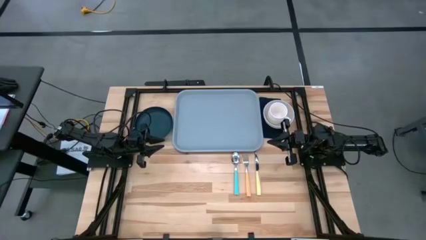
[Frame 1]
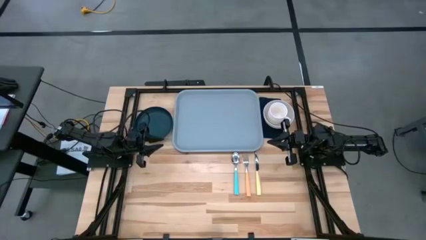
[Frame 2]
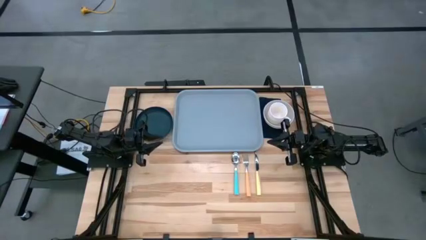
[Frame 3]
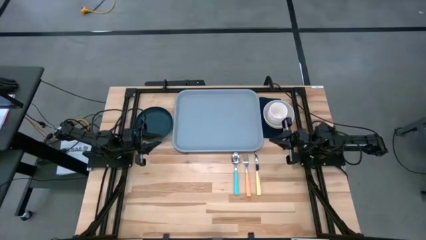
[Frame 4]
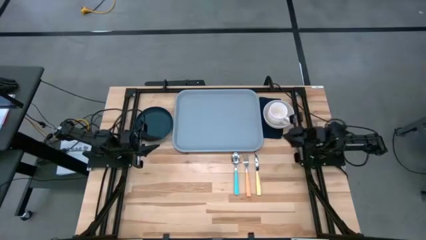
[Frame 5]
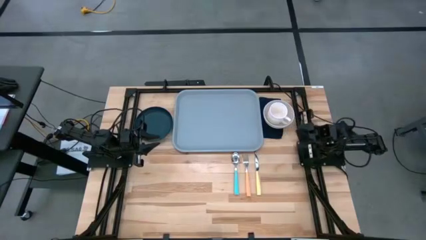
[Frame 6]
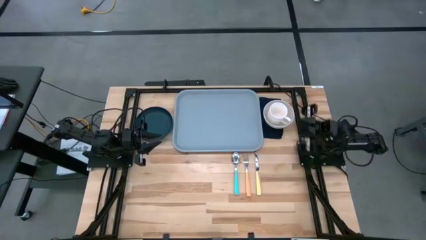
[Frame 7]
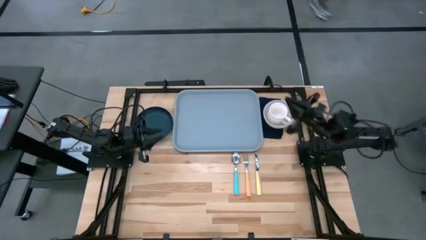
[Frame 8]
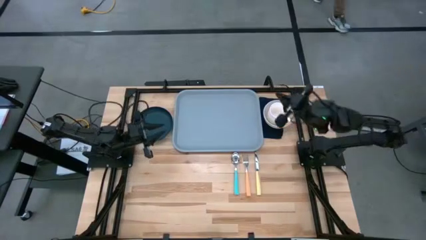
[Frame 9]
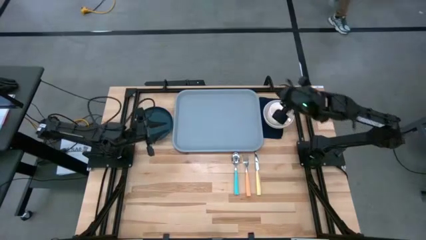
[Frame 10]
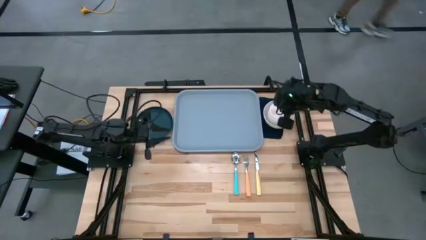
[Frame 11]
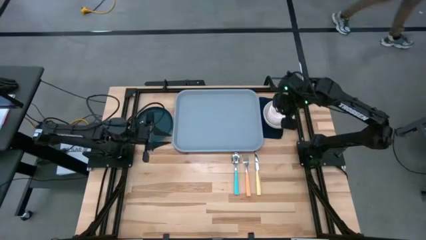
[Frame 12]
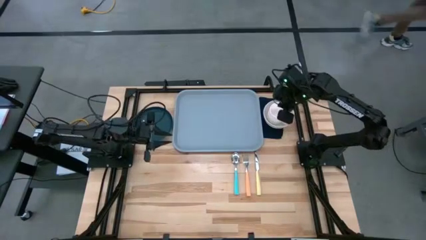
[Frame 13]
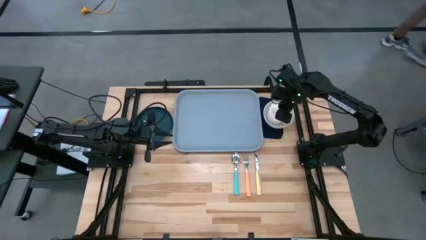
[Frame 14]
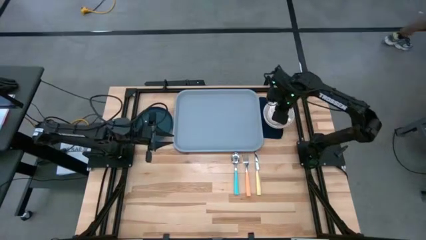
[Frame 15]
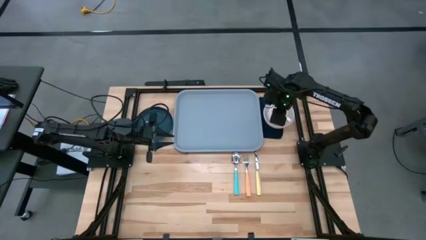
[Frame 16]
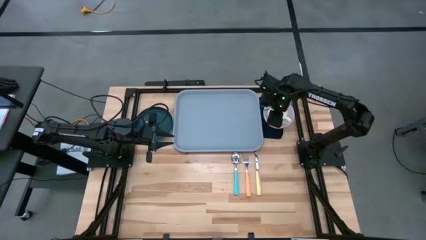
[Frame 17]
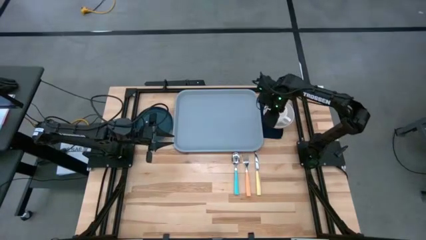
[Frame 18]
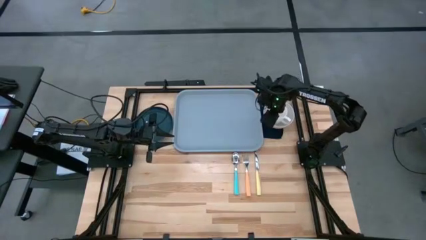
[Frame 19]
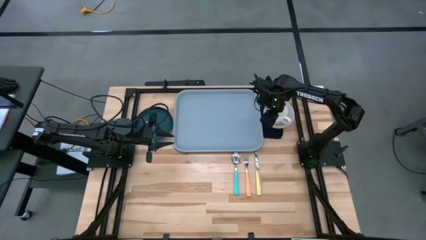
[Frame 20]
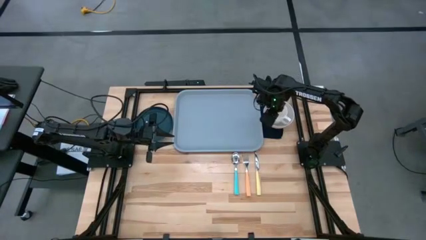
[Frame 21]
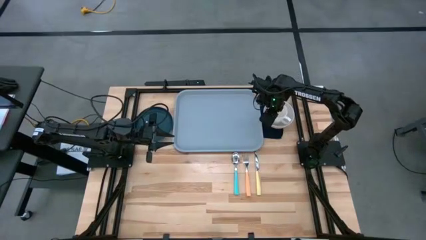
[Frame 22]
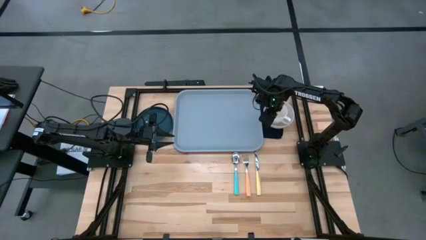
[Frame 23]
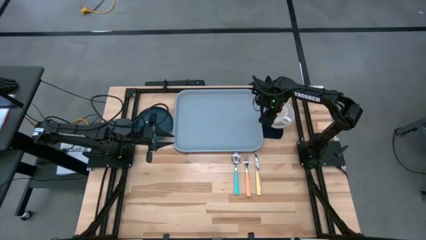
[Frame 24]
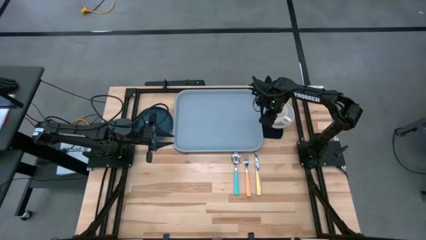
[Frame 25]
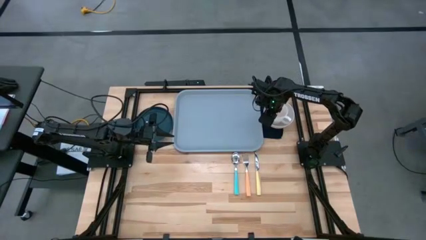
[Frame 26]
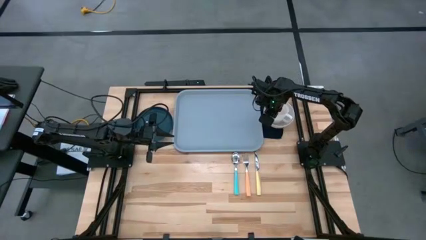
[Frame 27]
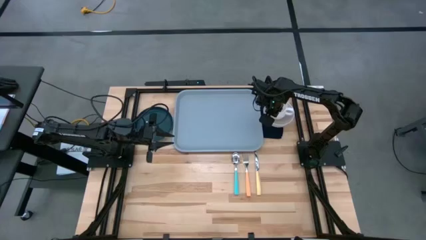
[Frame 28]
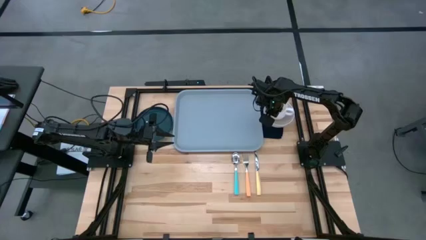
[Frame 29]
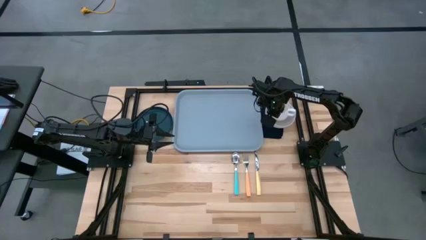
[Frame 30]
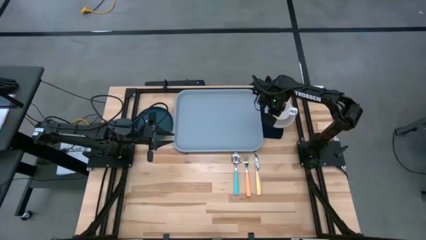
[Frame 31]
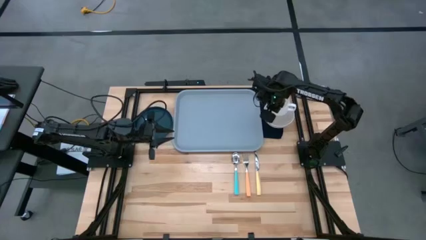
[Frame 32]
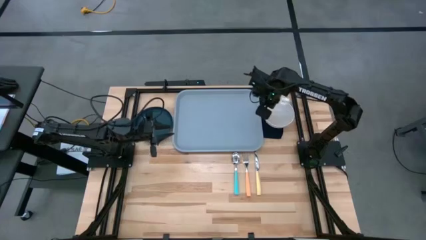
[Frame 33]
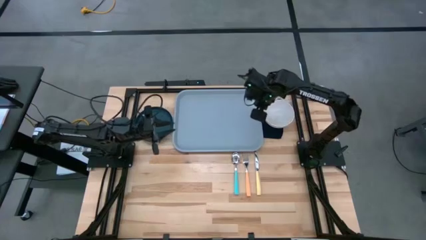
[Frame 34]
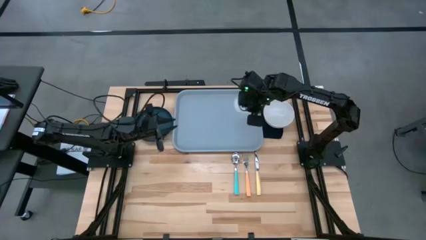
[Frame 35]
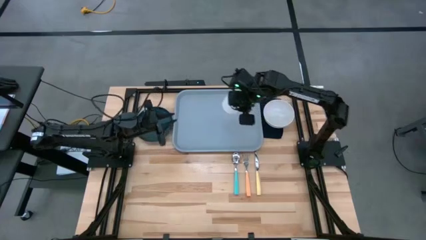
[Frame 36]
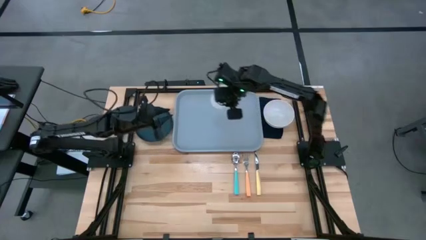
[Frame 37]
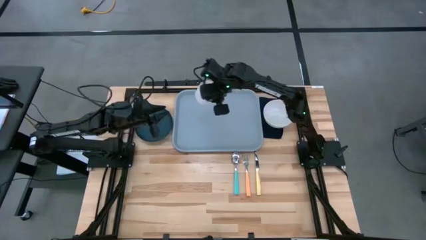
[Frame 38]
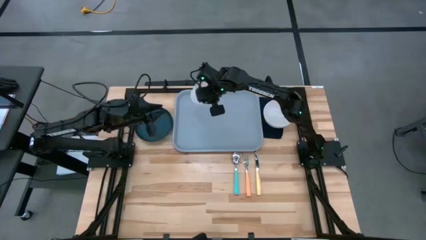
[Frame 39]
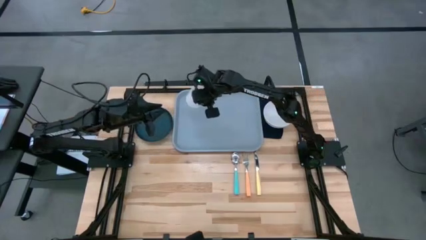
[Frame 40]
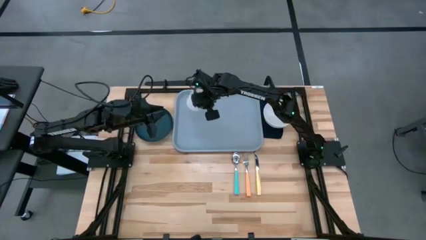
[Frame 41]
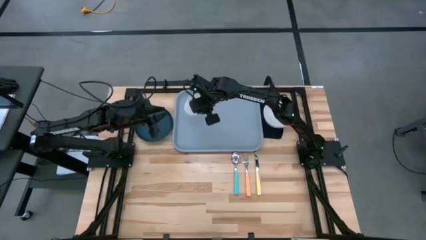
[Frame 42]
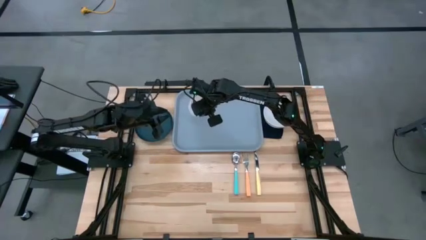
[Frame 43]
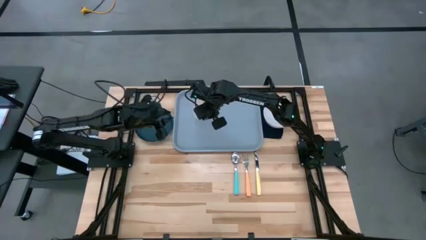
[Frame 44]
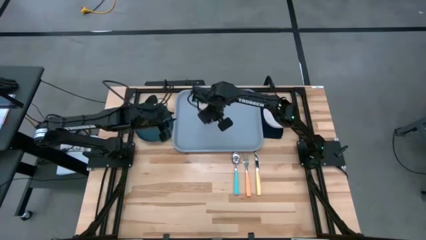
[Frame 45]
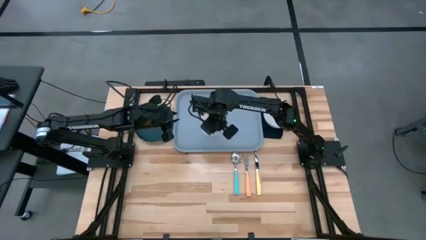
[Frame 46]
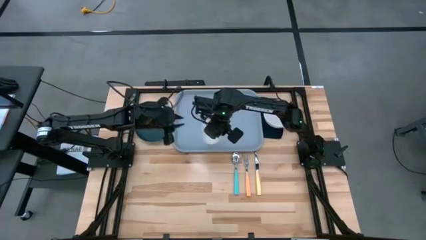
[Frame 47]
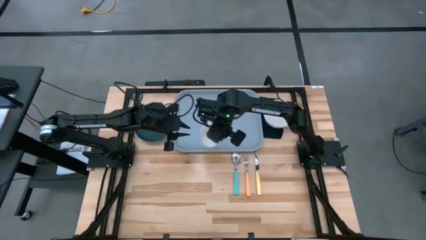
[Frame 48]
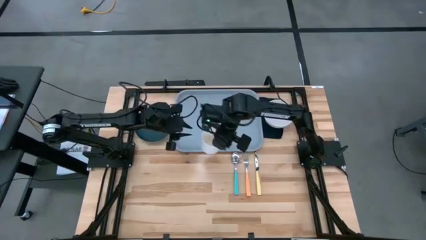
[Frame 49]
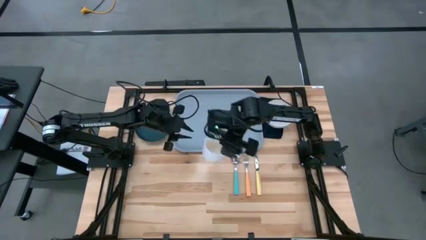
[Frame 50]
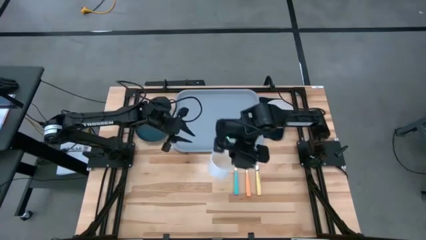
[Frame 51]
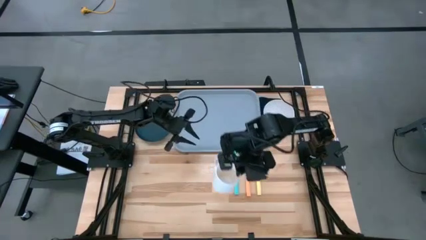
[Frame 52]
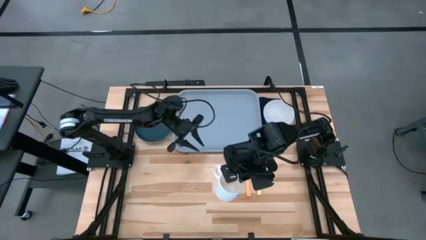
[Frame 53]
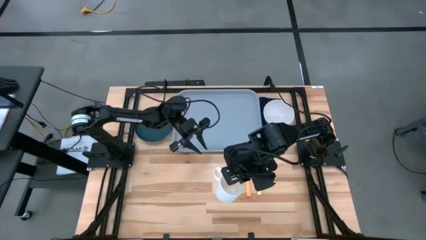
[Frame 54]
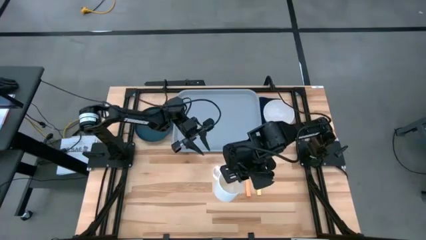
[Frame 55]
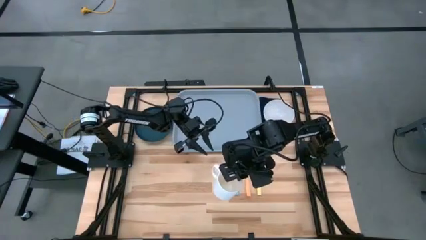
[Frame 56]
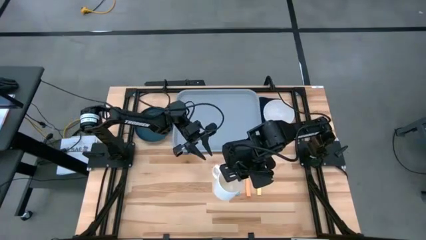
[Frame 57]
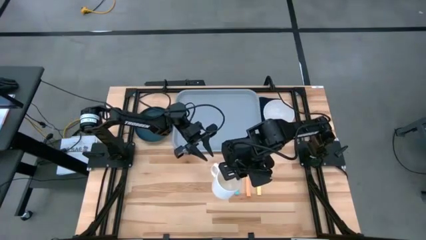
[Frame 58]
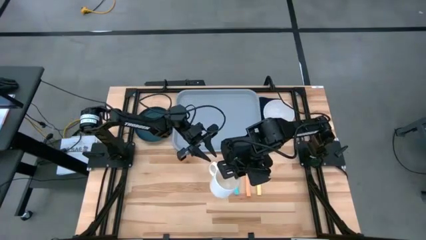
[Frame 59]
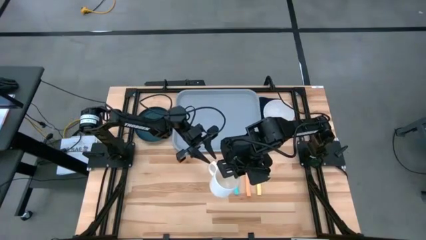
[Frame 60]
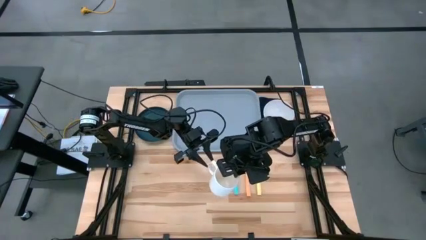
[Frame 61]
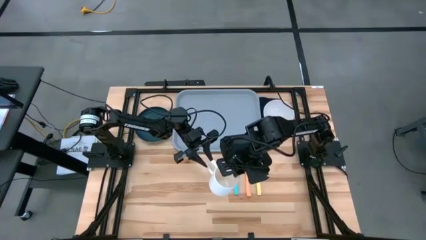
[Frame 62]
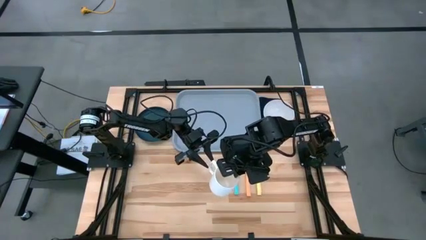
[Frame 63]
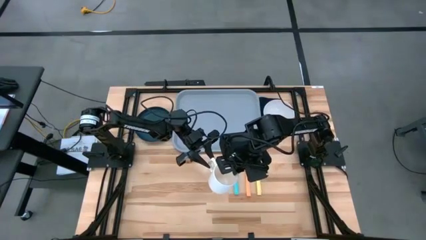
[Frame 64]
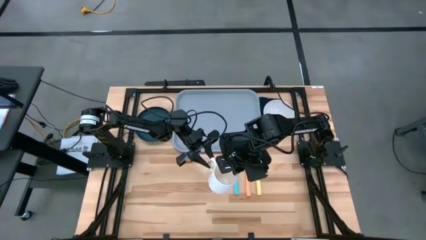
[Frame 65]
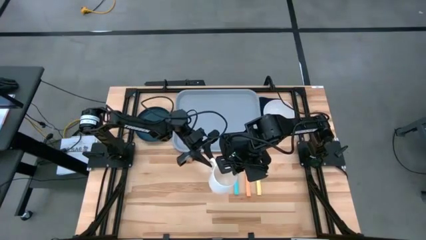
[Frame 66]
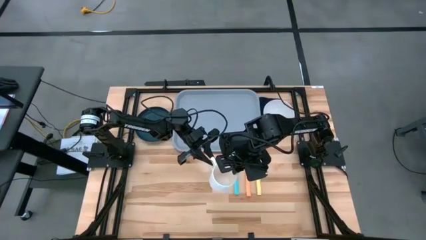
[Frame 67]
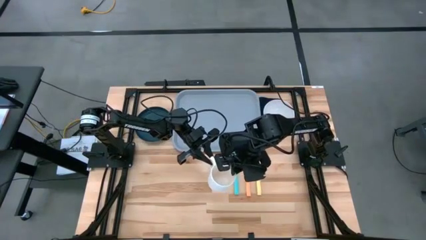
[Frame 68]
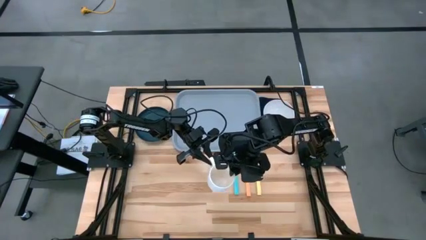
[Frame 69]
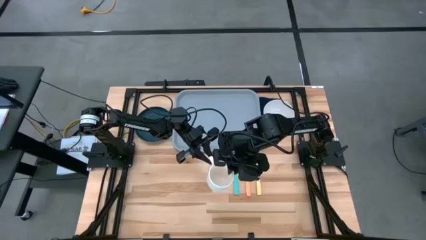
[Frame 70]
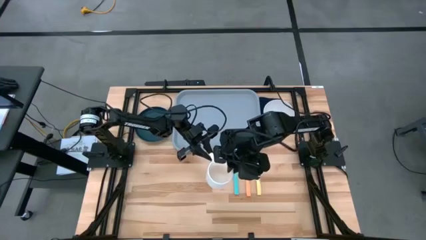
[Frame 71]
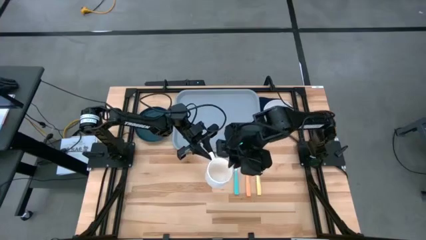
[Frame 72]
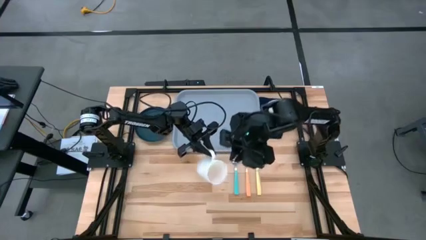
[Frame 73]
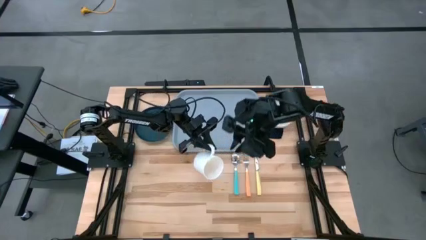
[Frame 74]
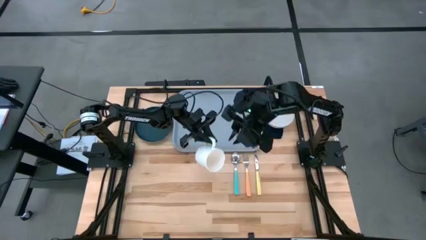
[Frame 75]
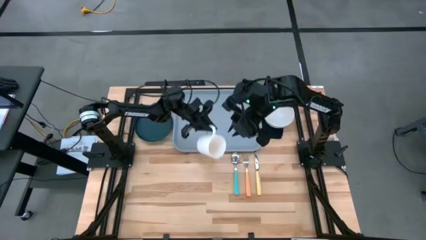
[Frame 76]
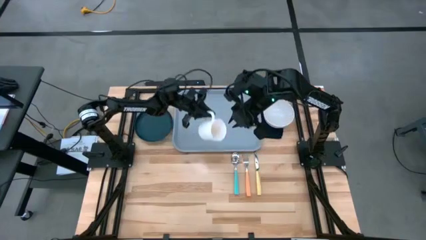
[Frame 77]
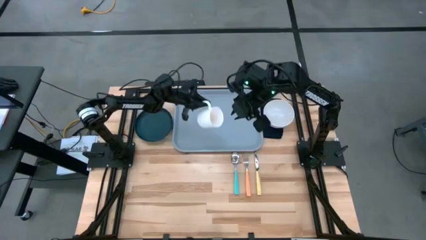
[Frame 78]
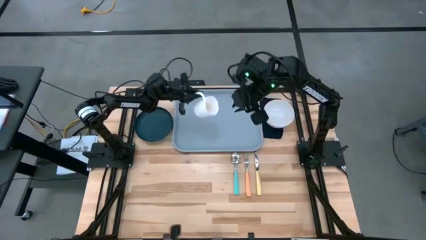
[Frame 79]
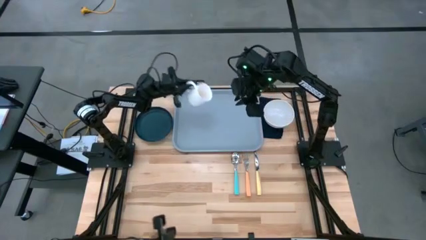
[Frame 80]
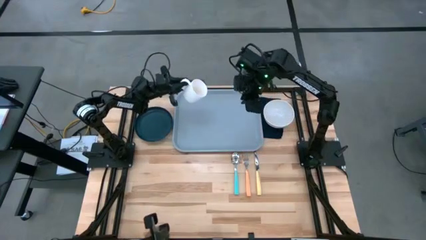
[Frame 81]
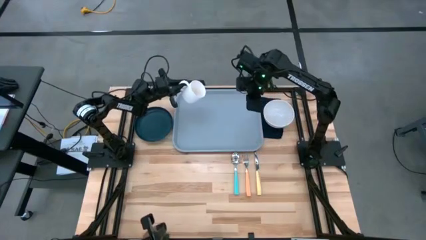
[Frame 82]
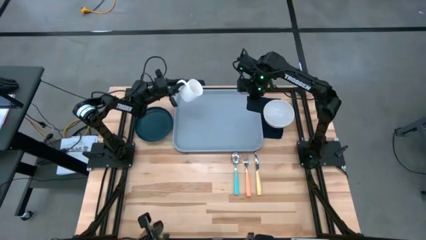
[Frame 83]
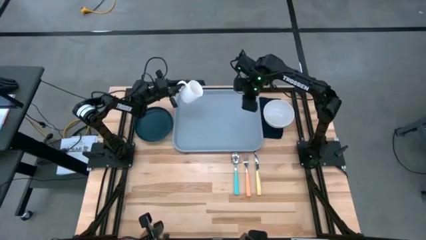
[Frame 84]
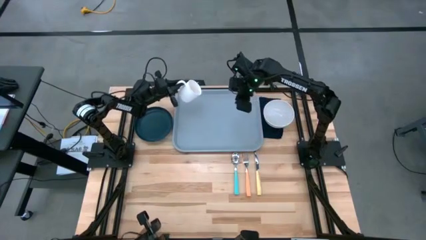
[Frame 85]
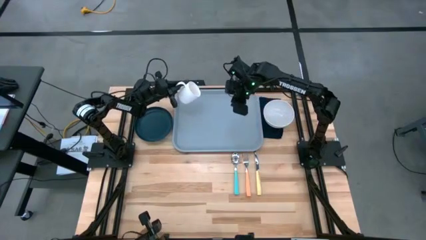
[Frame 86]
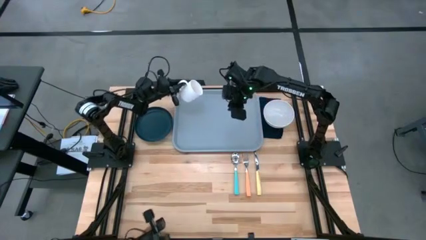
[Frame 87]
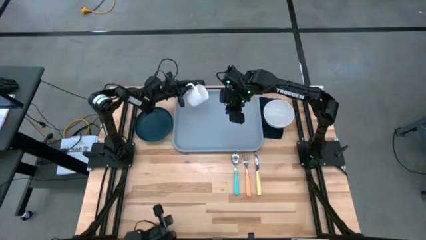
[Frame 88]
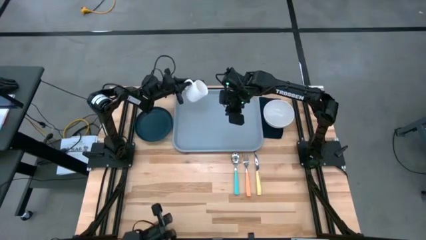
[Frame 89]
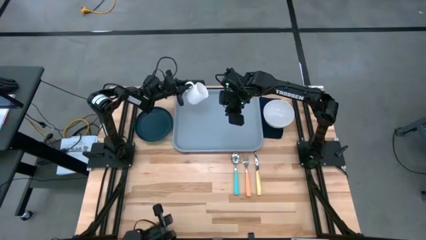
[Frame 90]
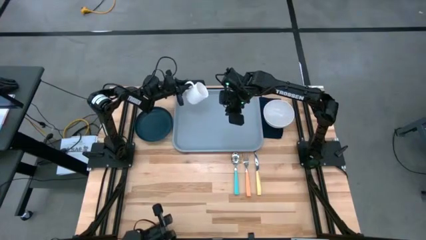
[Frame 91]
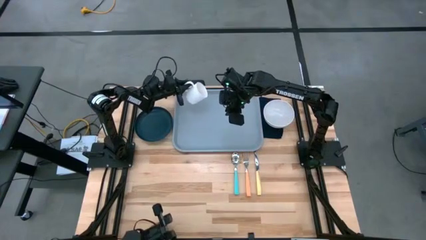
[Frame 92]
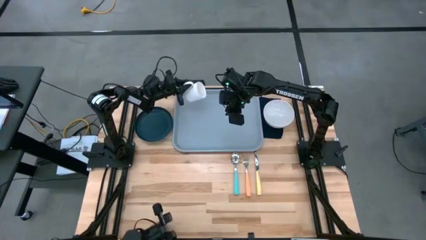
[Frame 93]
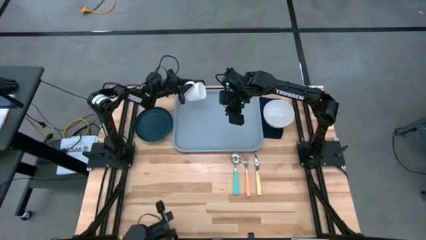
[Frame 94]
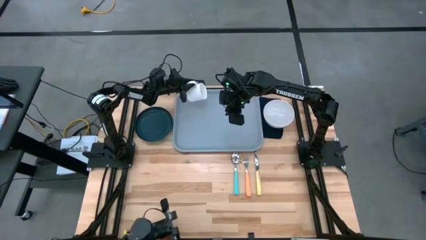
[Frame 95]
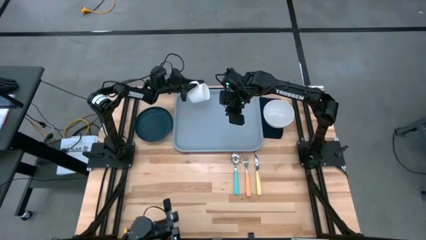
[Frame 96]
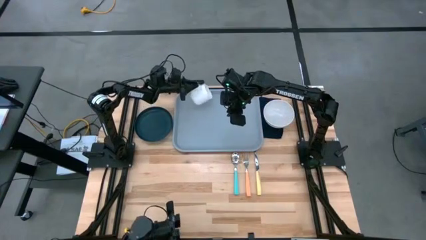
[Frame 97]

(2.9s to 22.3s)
Task: Set up tray
Put the white mug on the gray tray
